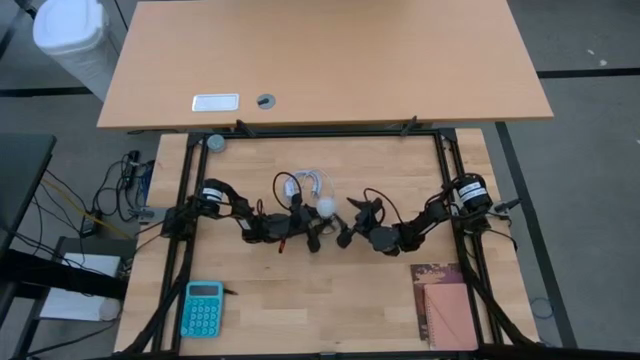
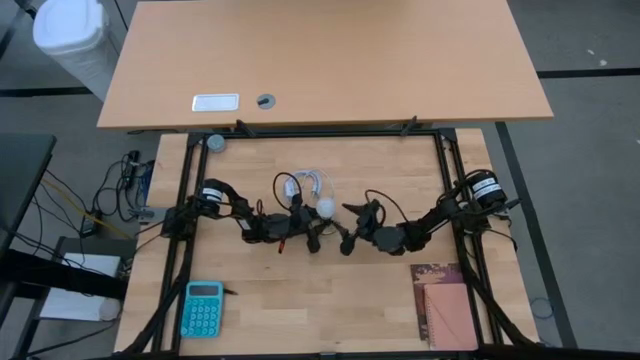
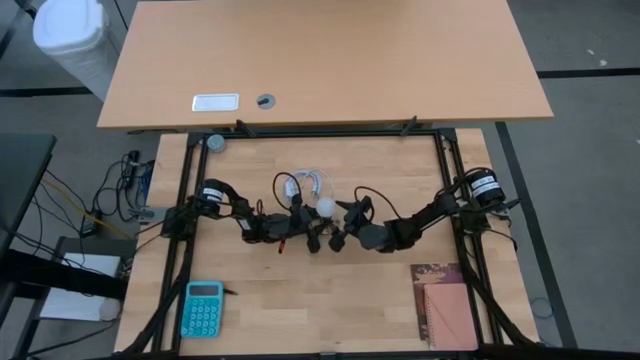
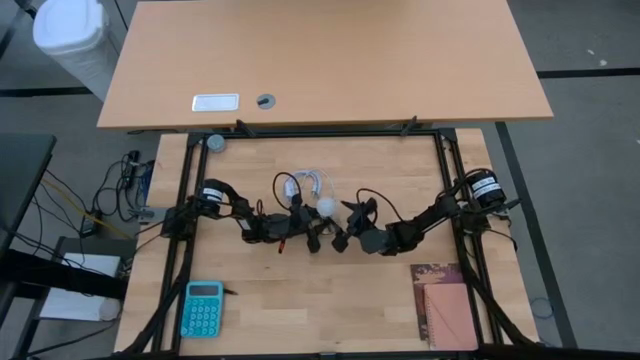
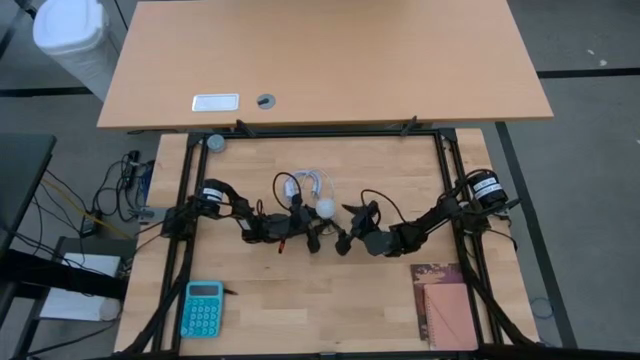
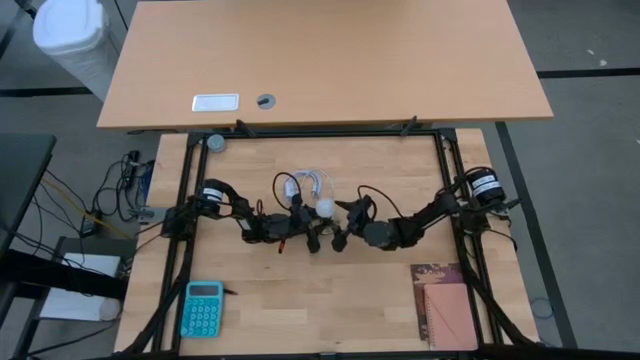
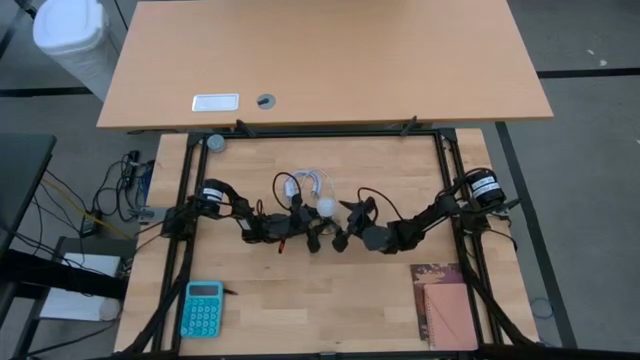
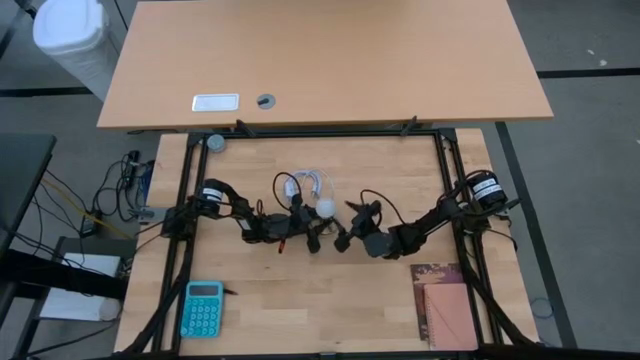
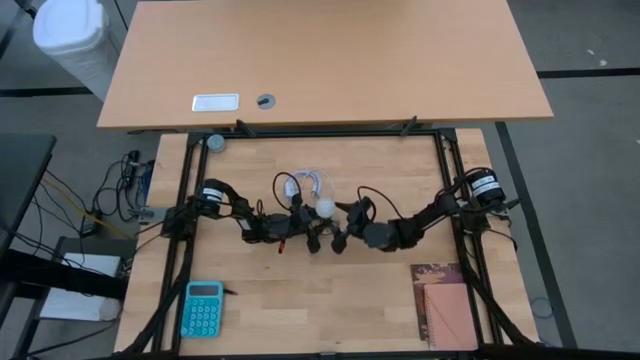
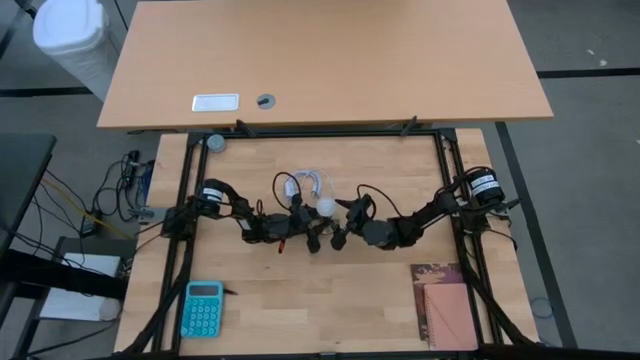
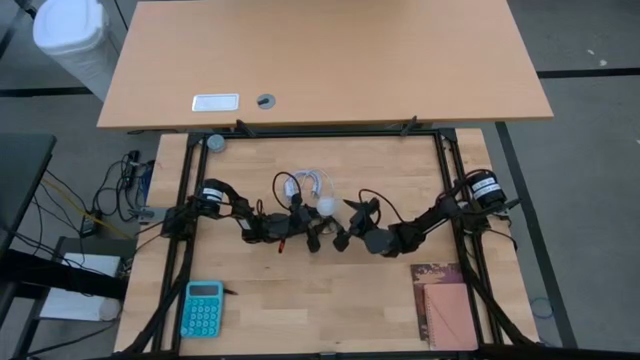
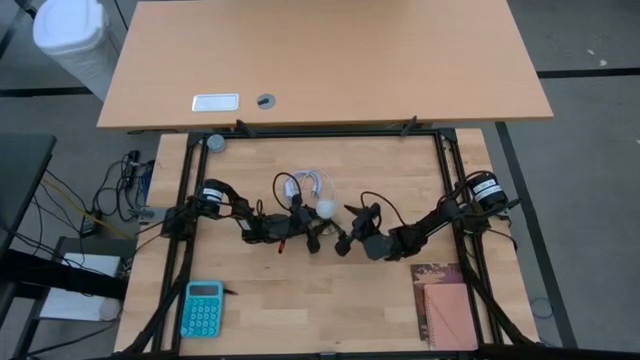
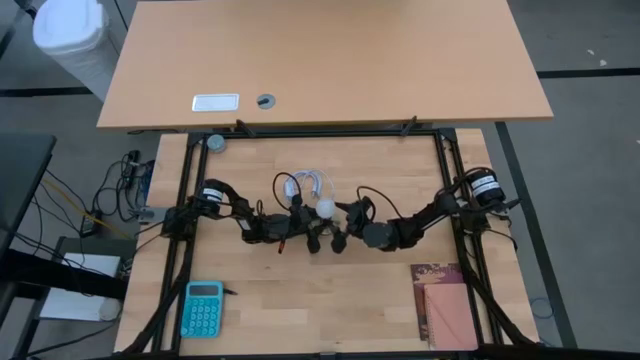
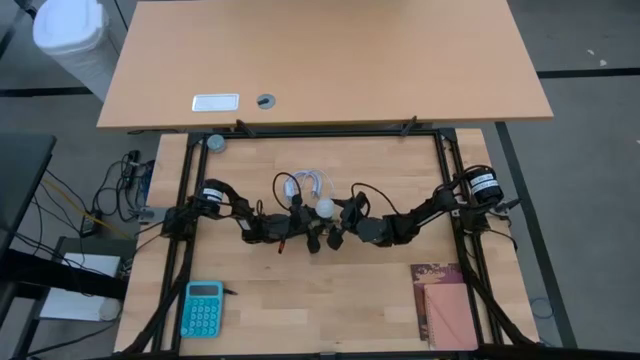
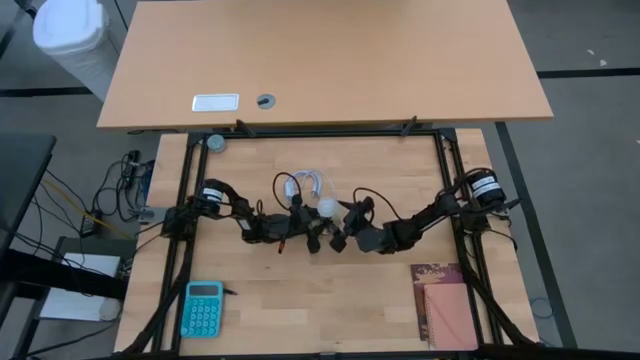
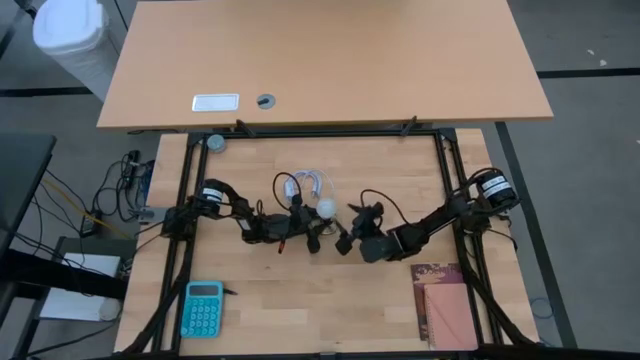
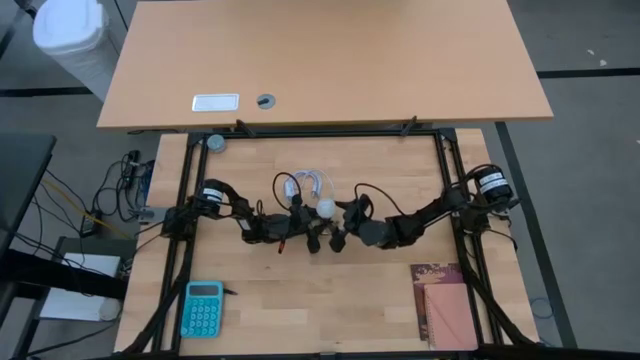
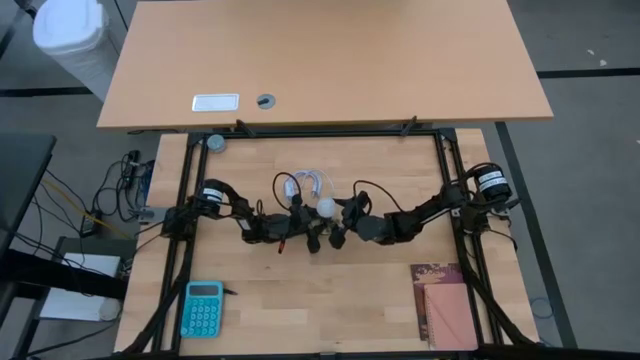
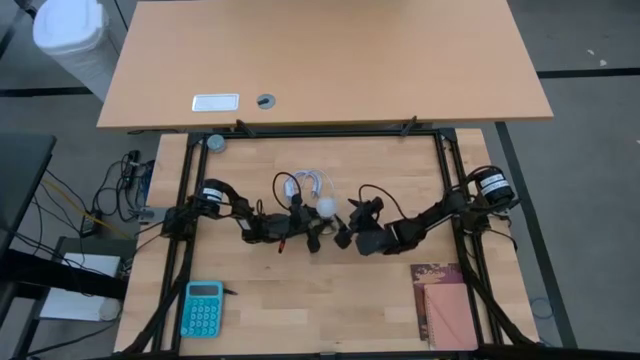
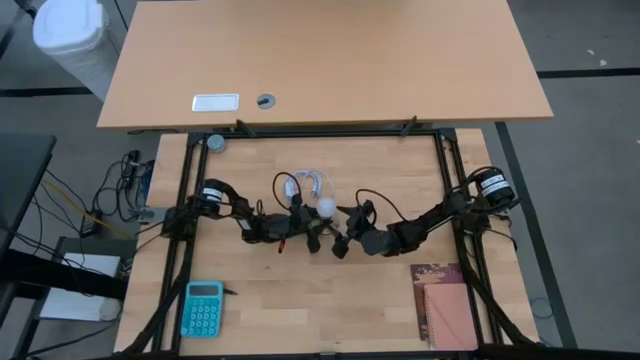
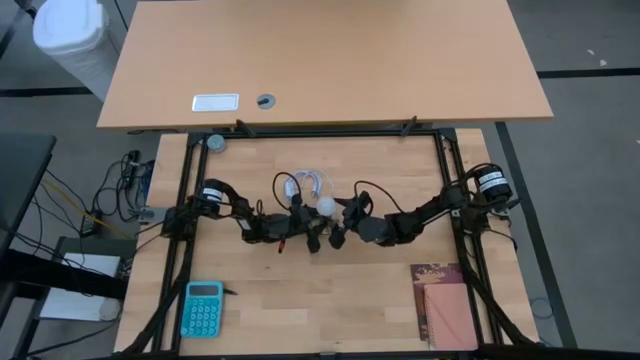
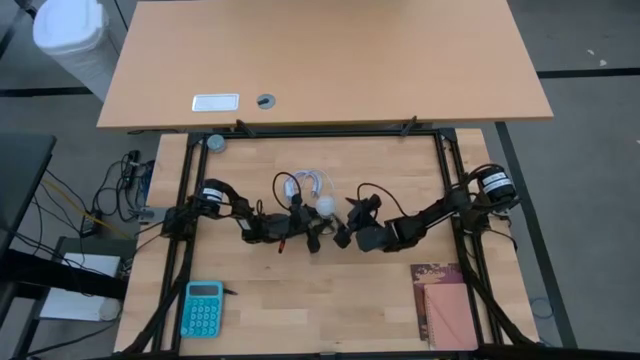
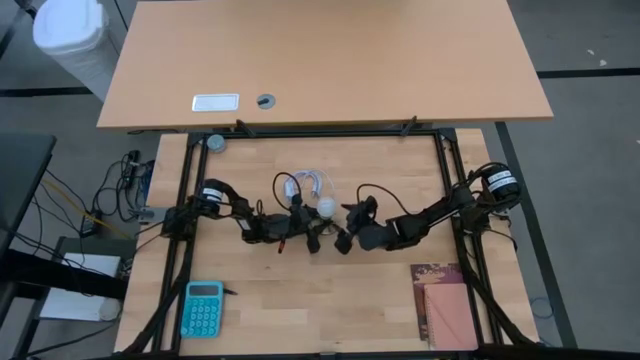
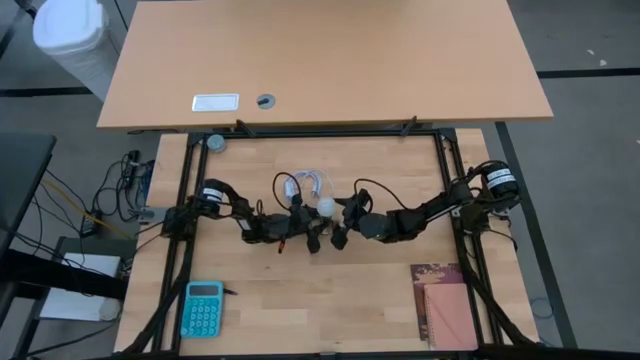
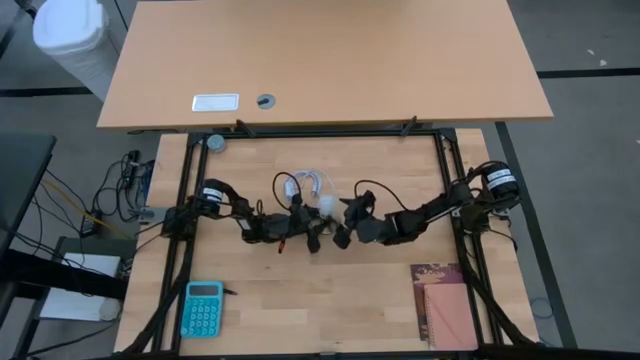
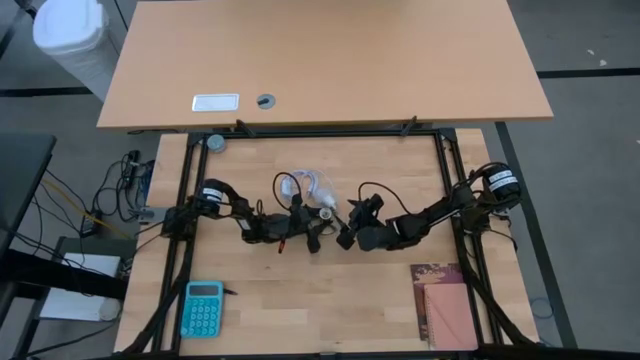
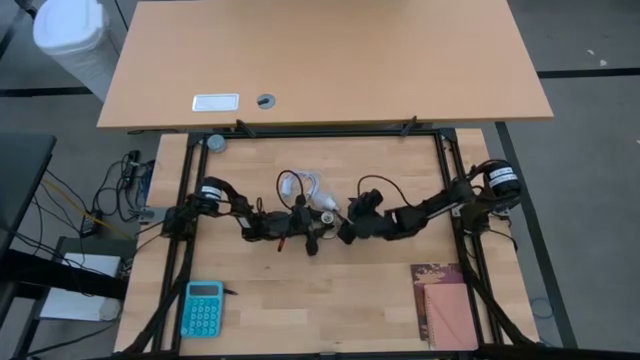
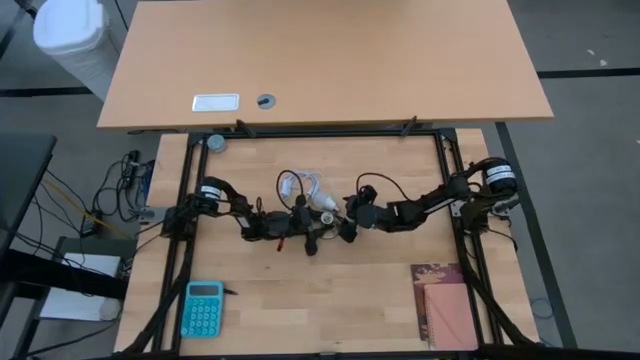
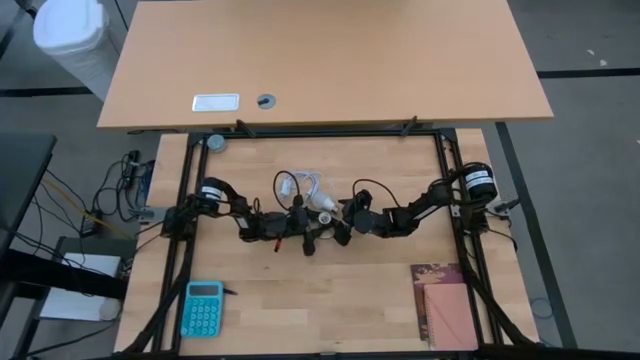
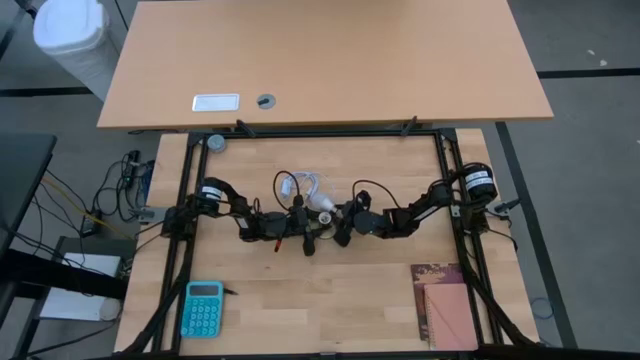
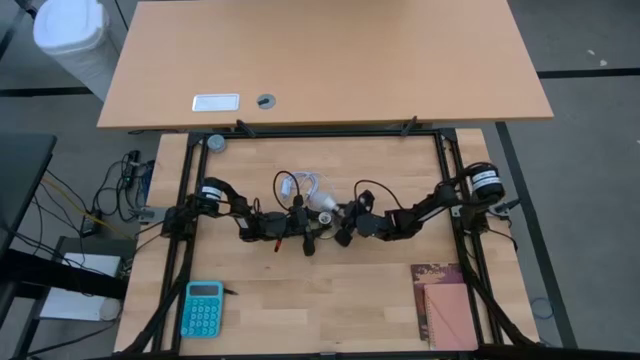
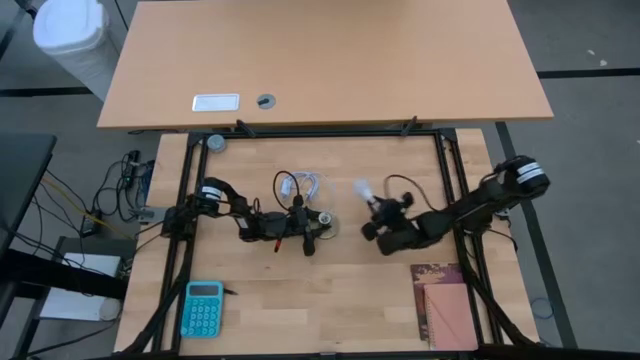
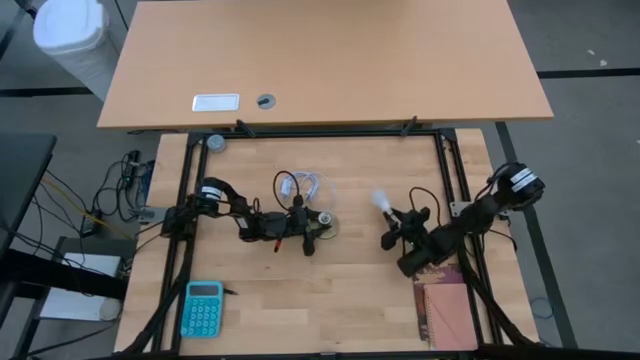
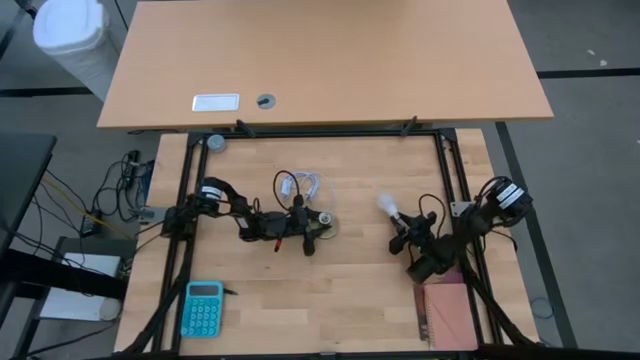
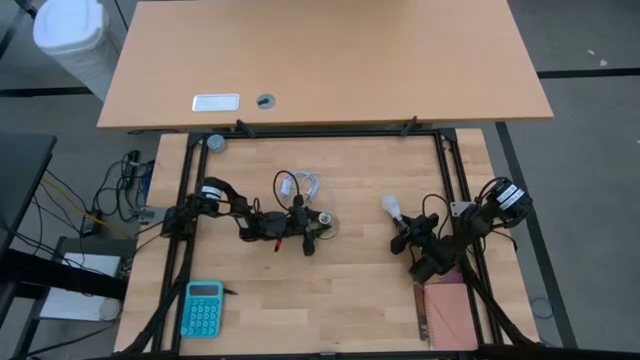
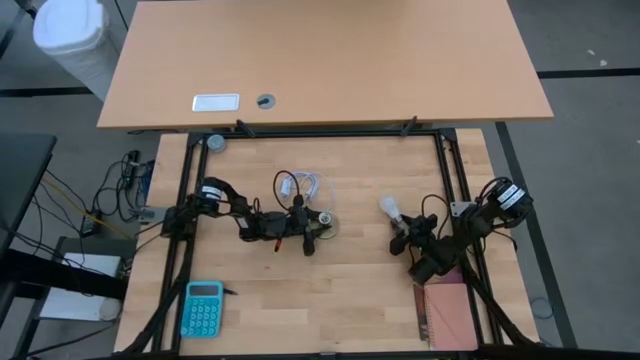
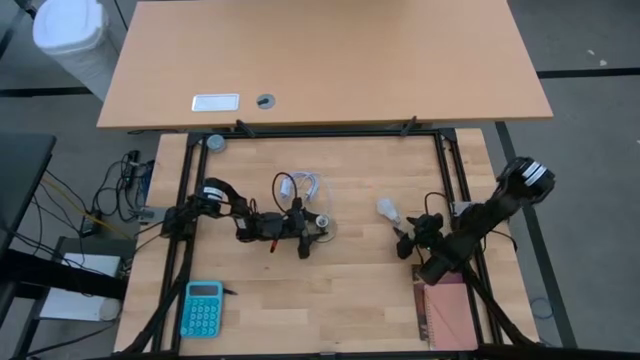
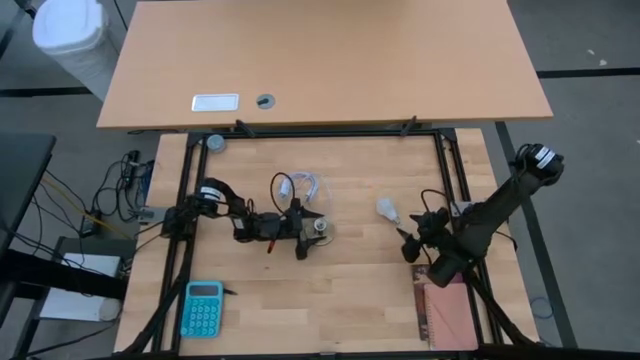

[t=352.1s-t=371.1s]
Task: Screw lightbulb
Remove the white lightbulb from the lamp socket
